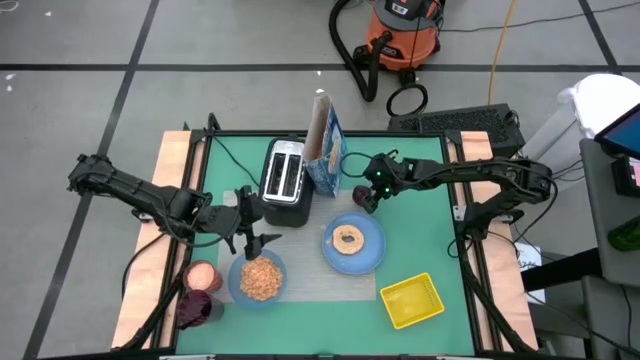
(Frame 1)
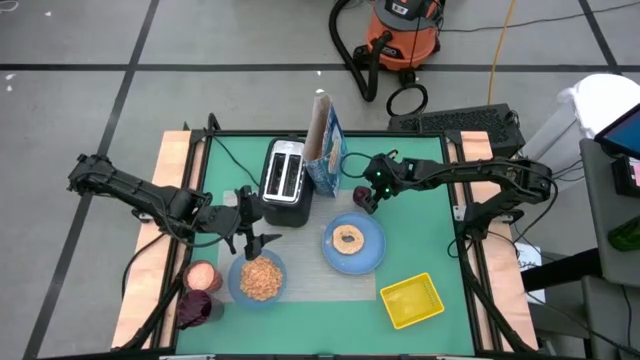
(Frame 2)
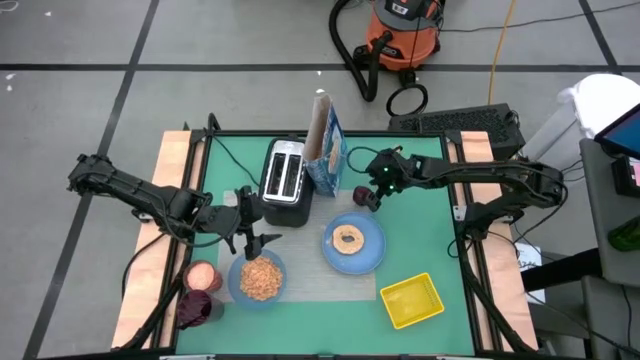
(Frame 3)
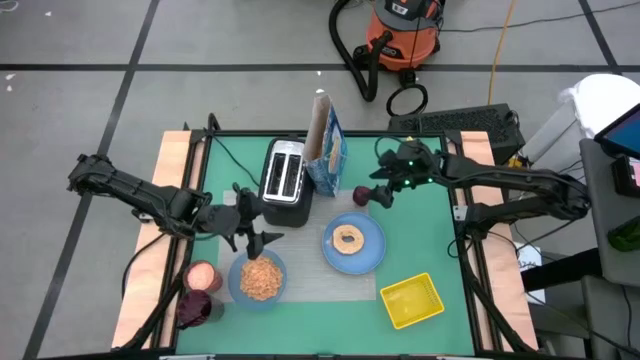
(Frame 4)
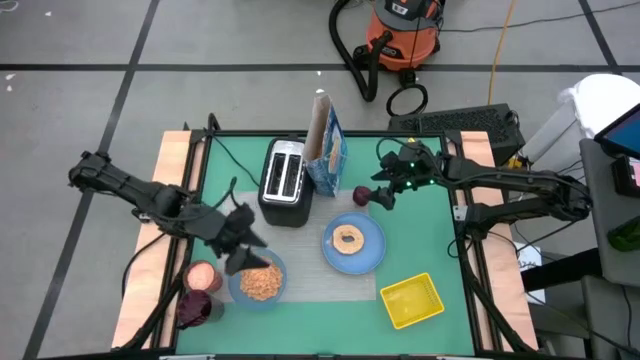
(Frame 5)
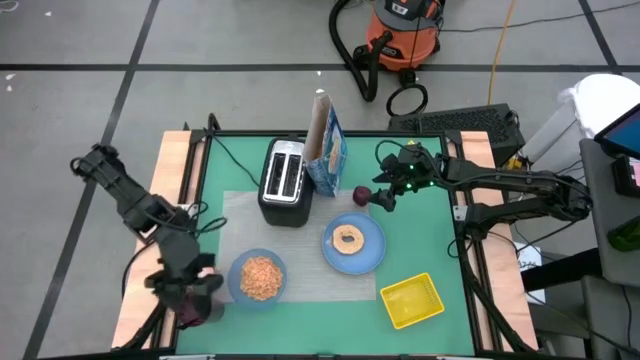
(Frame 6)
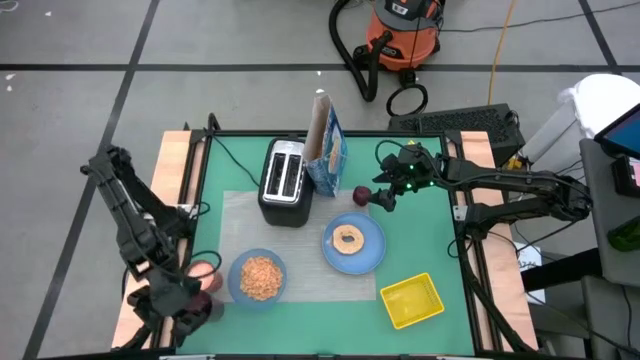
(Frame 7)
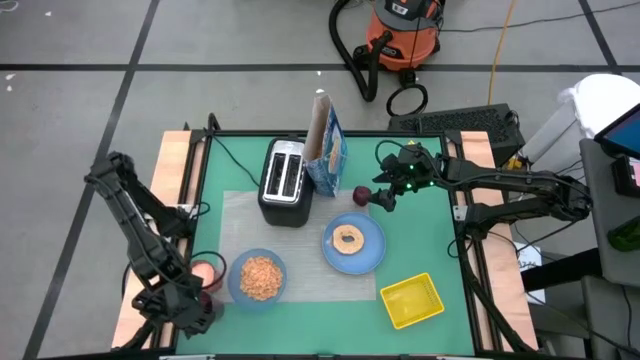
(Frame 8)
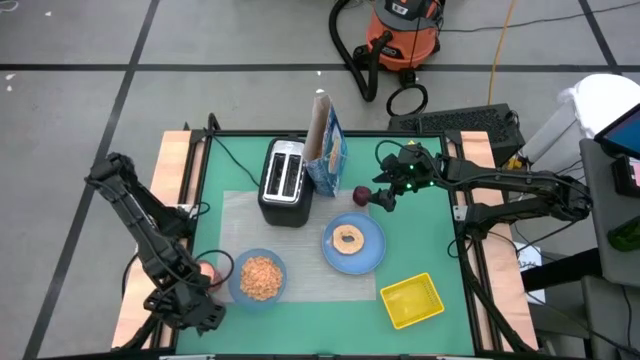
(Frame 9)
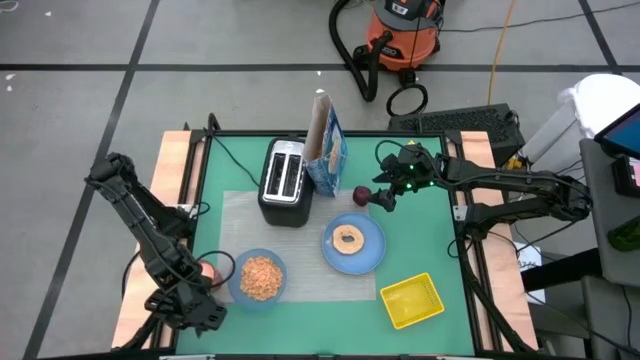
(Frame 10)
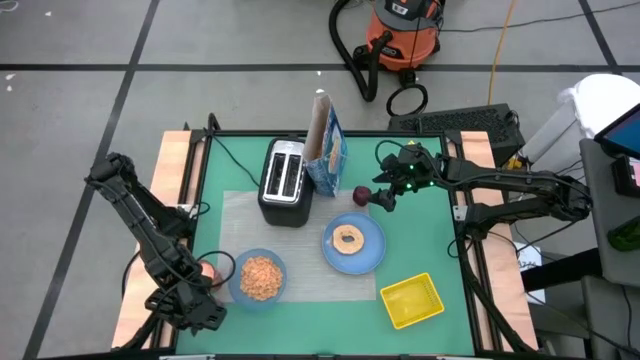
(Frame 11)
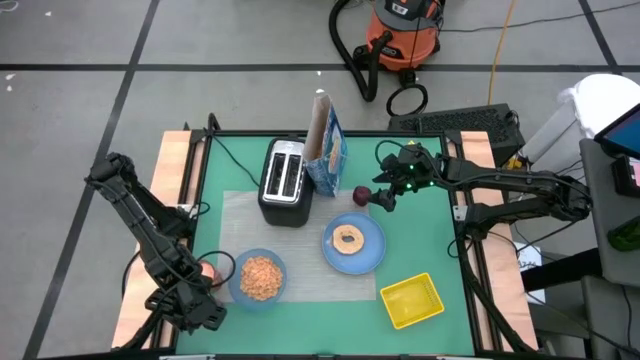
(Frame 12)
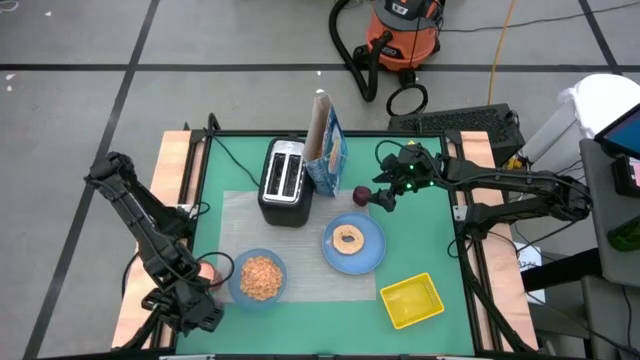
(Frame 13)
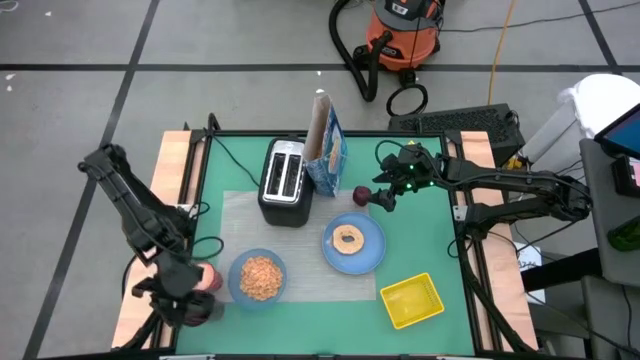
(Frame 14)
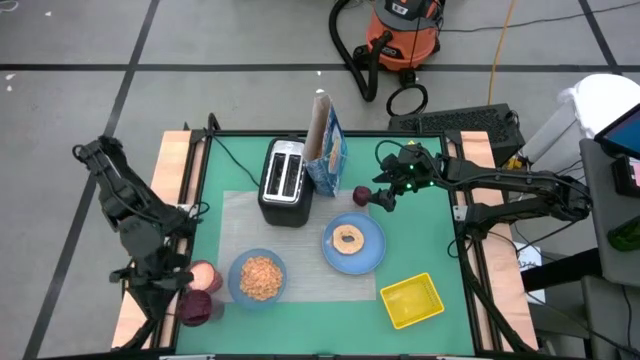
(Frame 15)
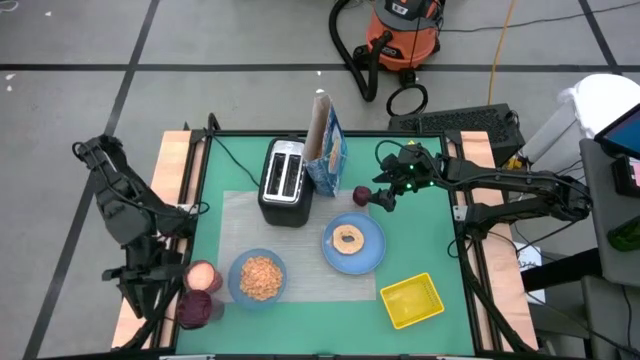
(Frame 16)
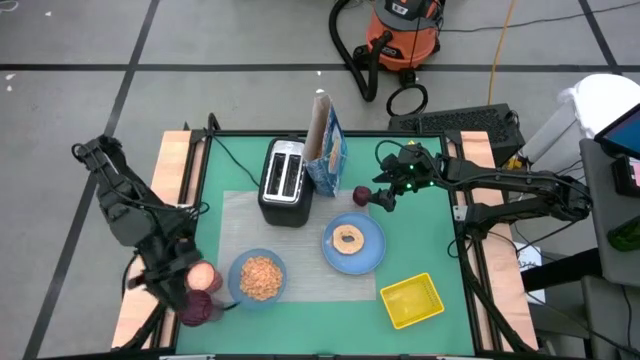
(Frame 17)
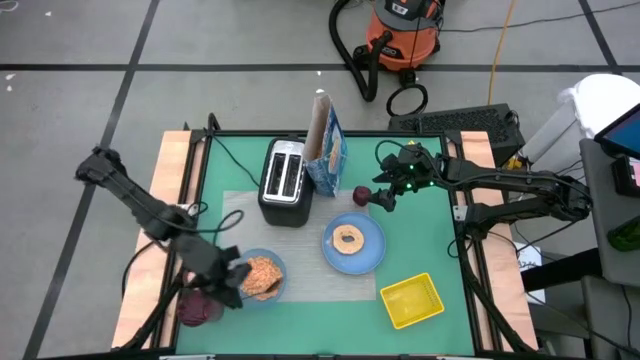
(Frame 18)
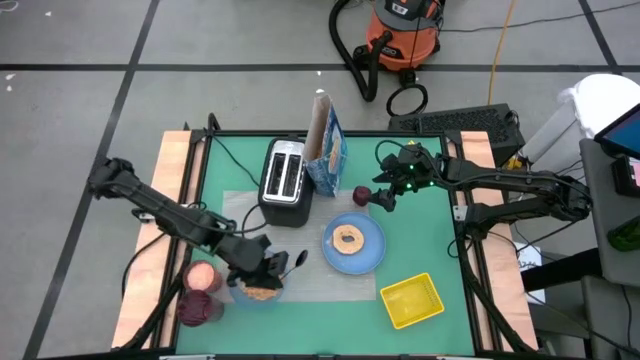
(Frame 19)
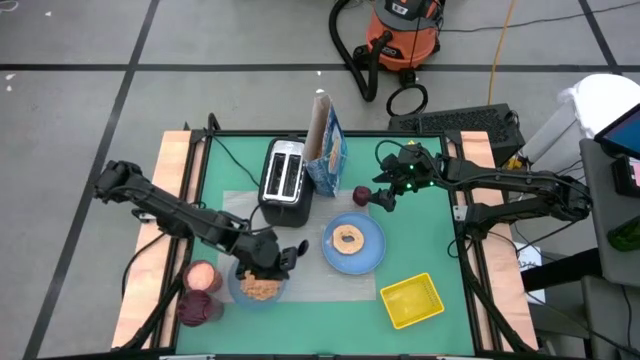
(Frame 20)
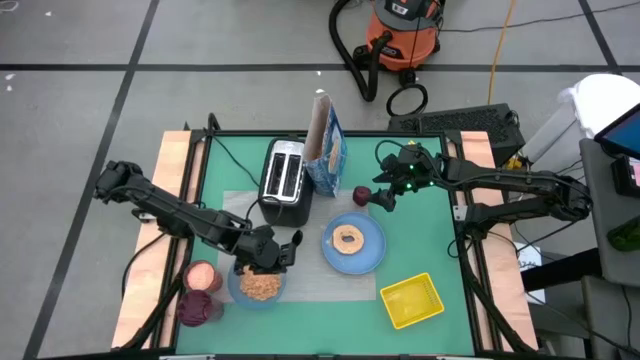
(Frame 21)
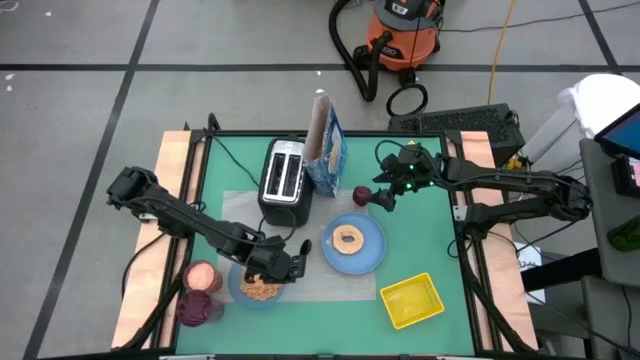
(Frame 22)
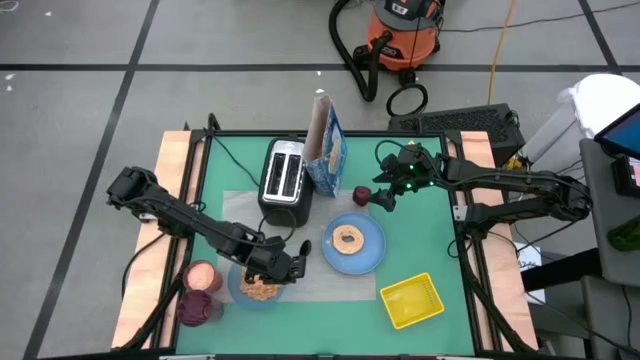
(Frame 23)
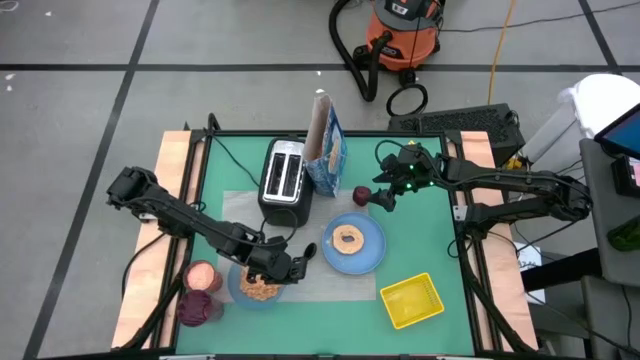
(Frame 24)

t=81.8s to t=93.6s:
Task: Arrange a breakfast setting
Put the black spoon on the gray mat to the left of the blue plate

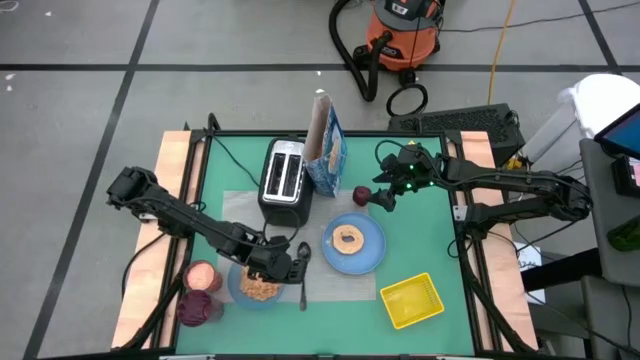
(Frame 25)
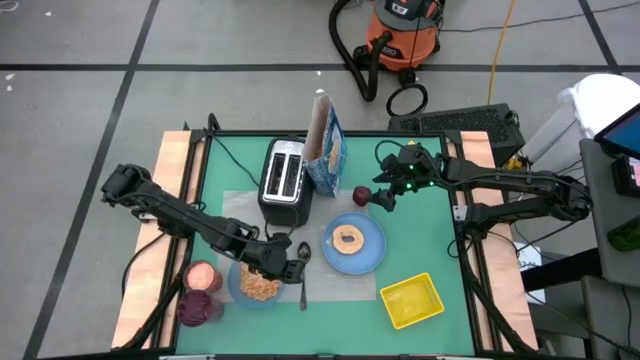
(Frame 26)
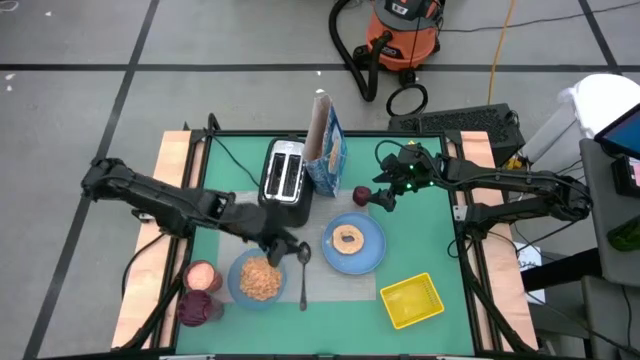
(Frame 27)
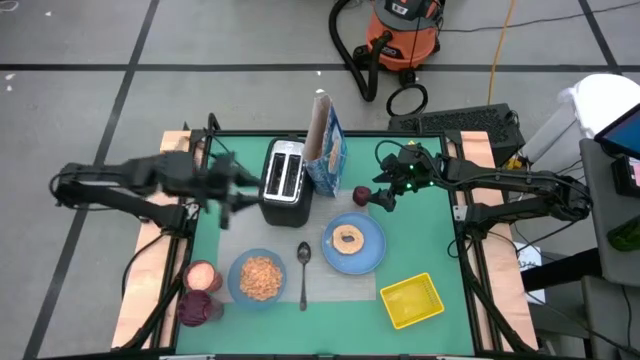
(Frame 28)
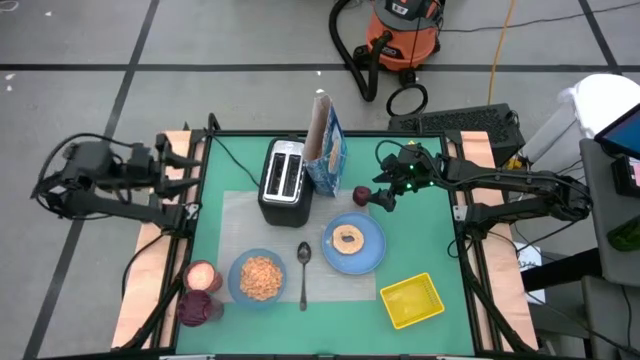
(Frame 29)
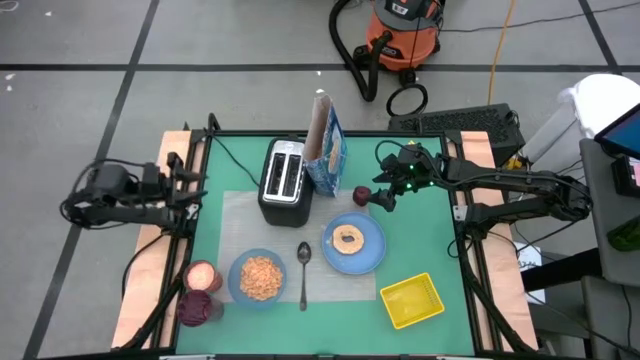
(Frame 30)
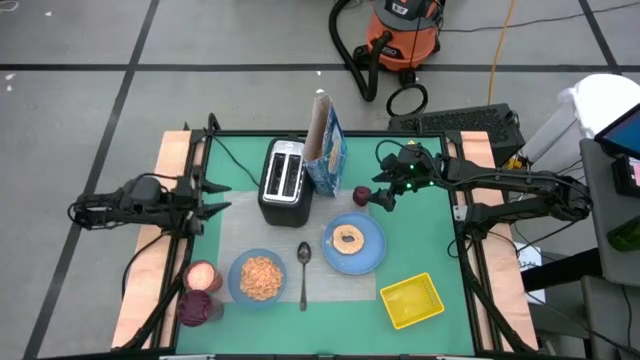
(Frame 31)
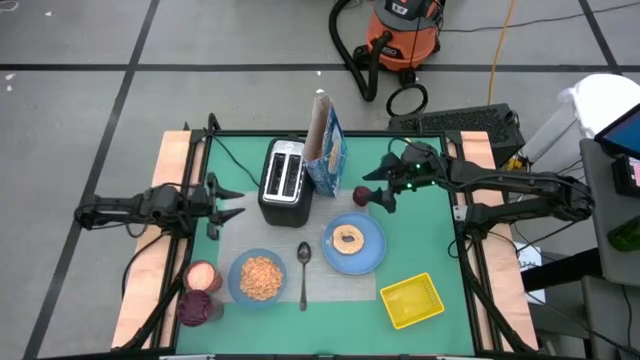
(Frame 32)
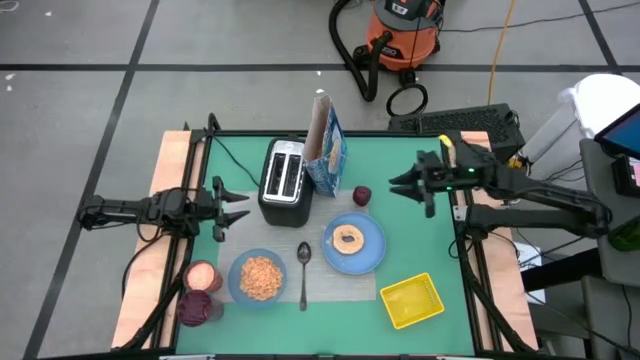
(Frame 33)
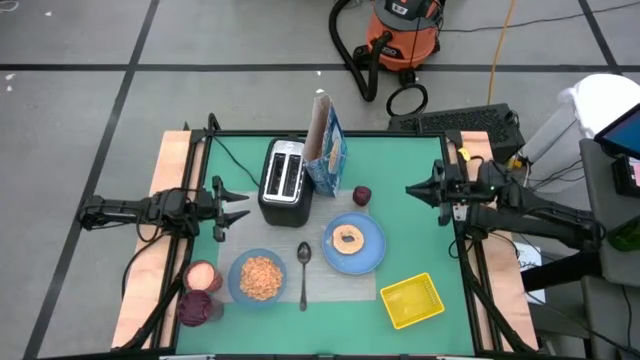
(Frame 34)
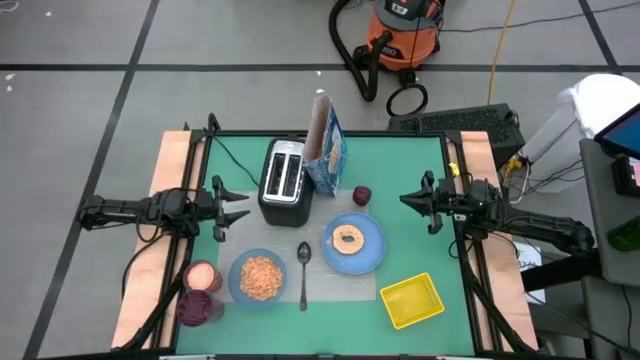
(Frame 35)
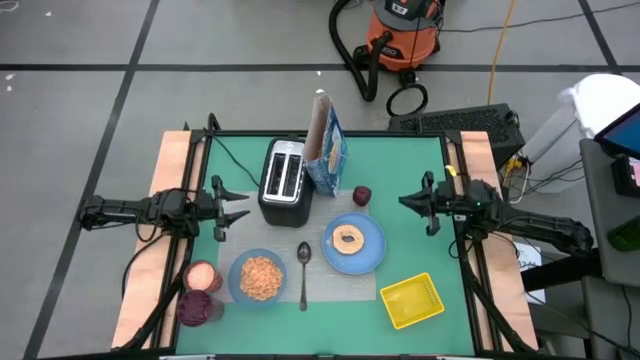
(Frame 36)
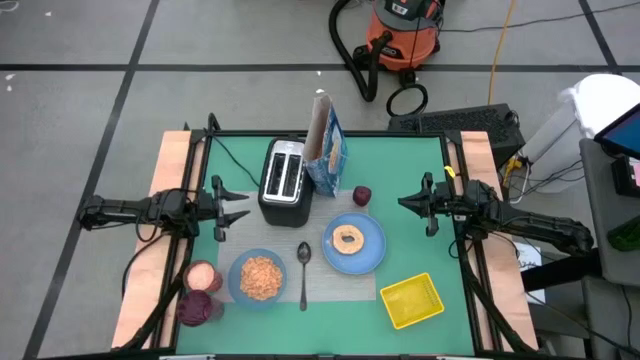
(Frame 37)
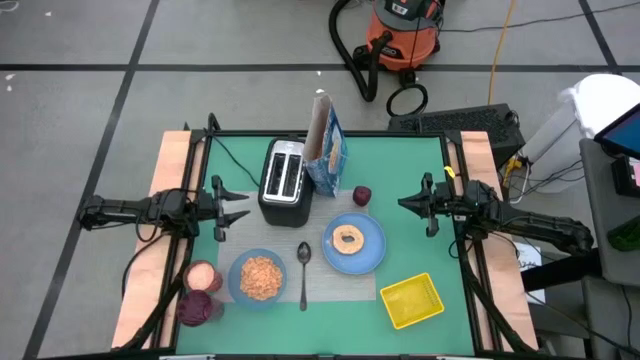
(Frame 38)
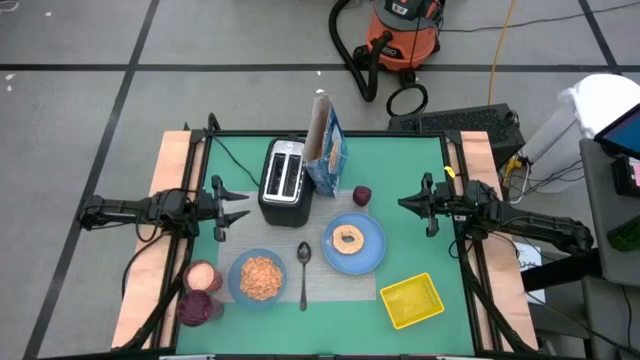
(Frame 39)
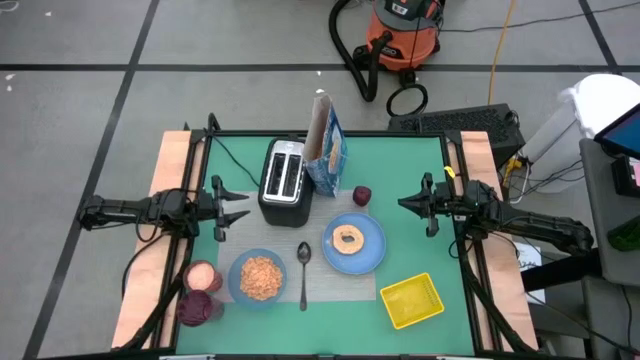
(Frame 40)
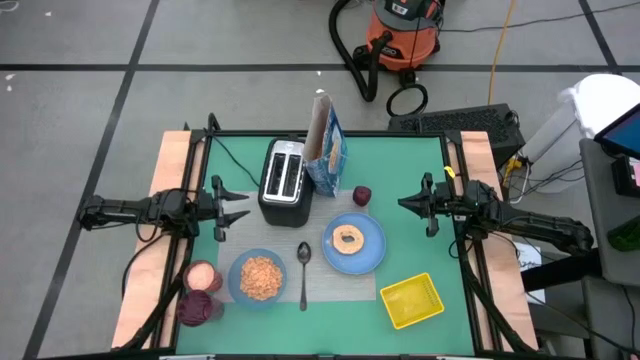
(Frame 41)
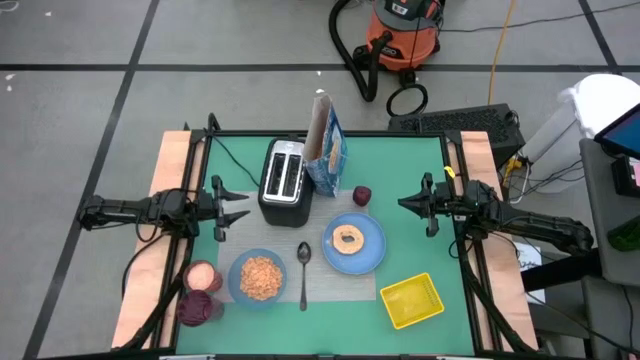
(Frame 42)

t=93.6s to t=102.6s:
Return to Home Position
